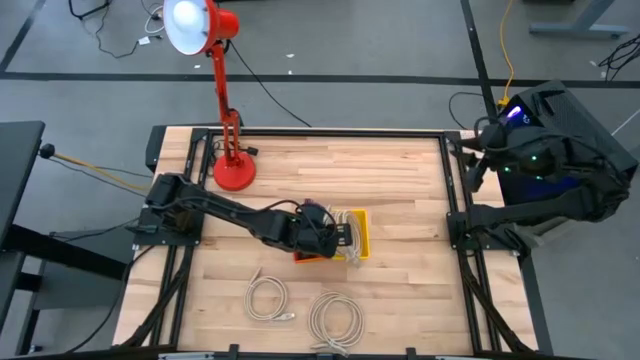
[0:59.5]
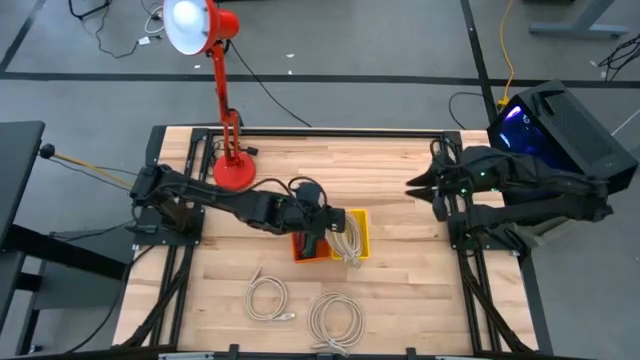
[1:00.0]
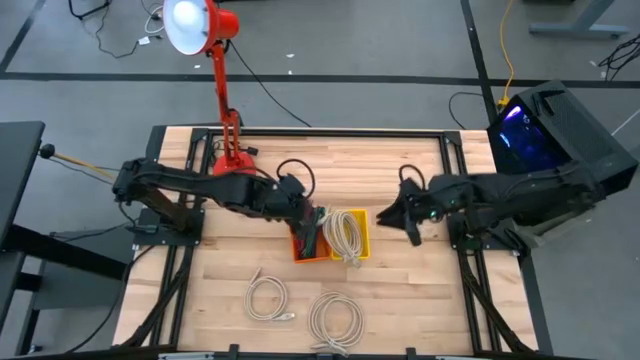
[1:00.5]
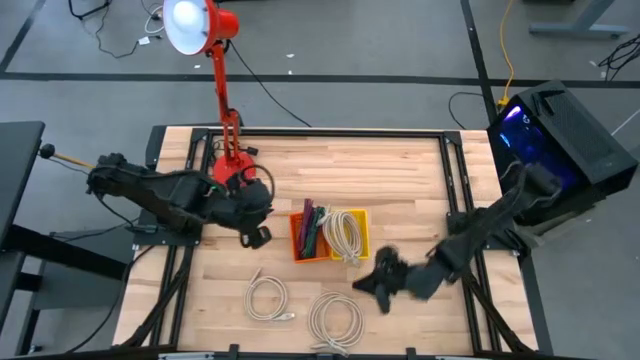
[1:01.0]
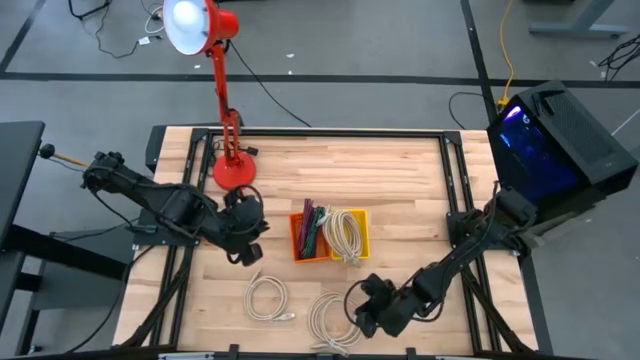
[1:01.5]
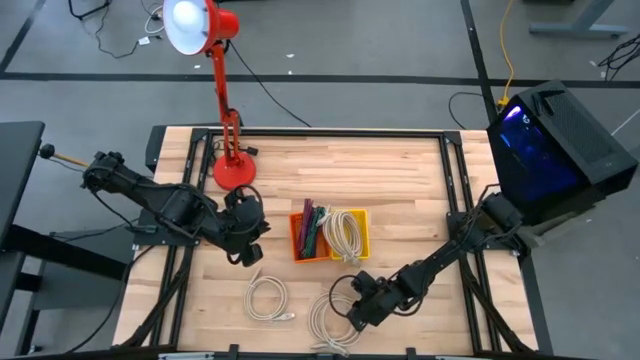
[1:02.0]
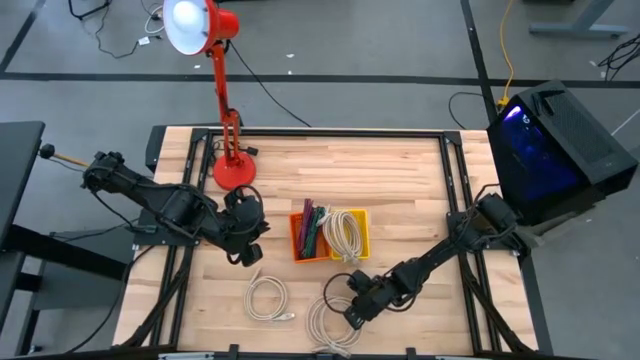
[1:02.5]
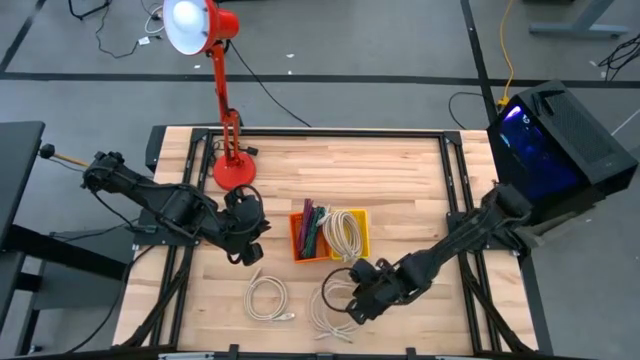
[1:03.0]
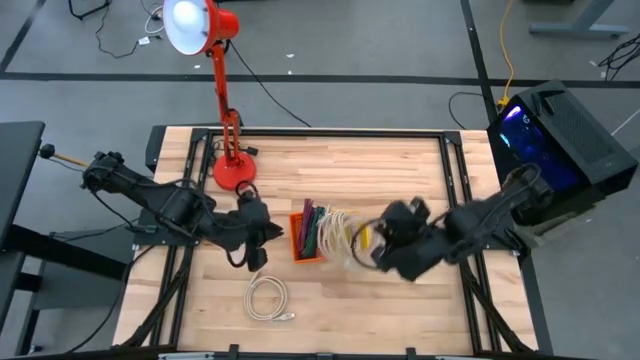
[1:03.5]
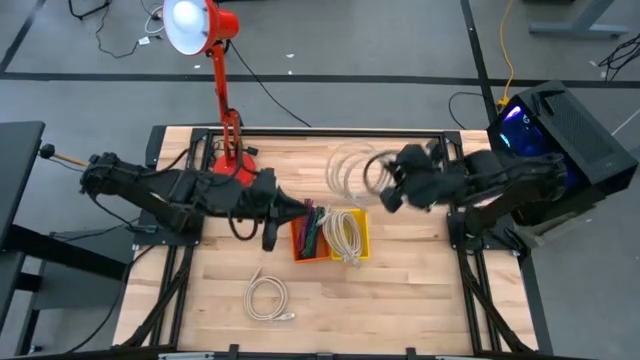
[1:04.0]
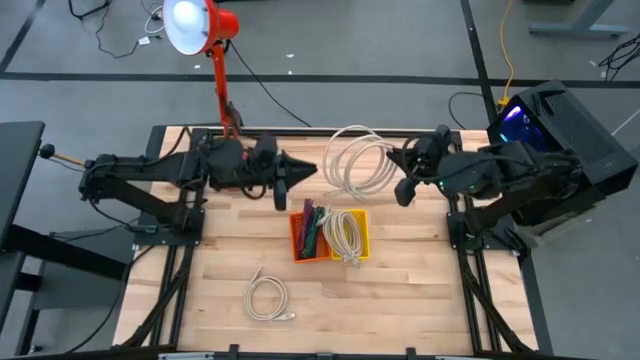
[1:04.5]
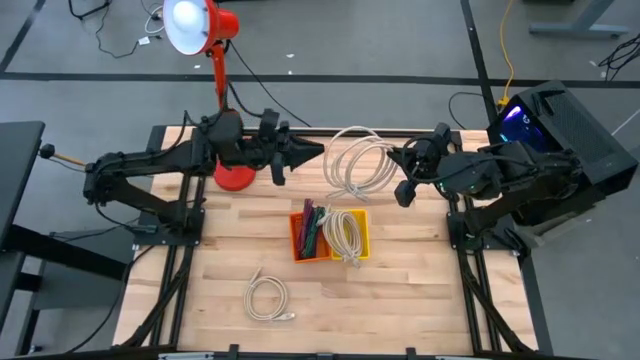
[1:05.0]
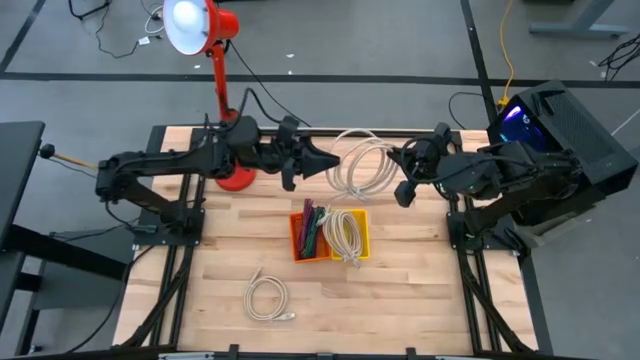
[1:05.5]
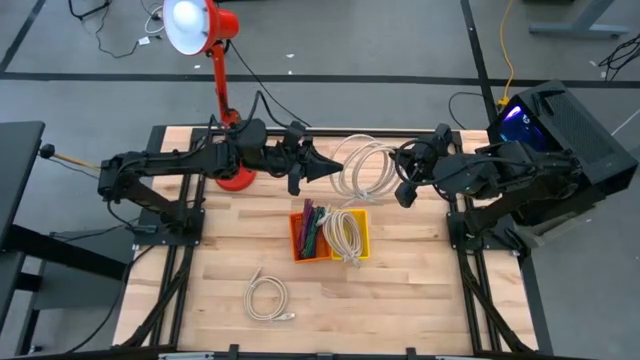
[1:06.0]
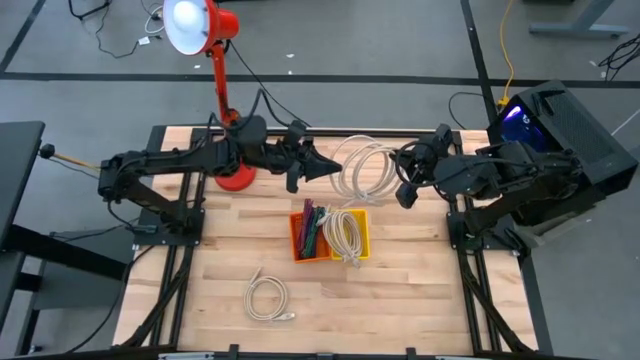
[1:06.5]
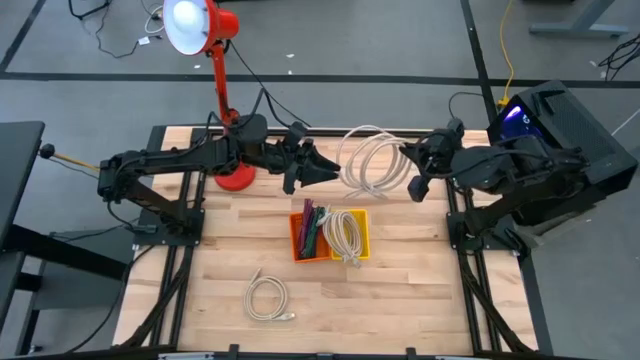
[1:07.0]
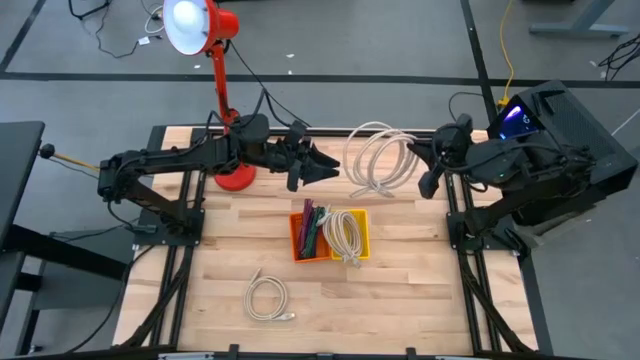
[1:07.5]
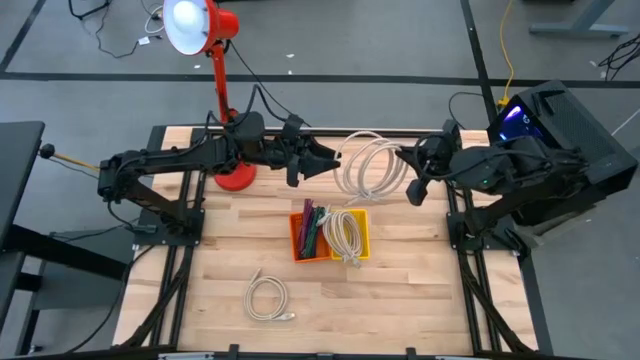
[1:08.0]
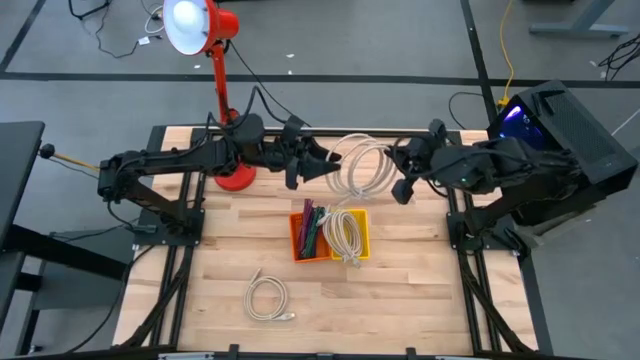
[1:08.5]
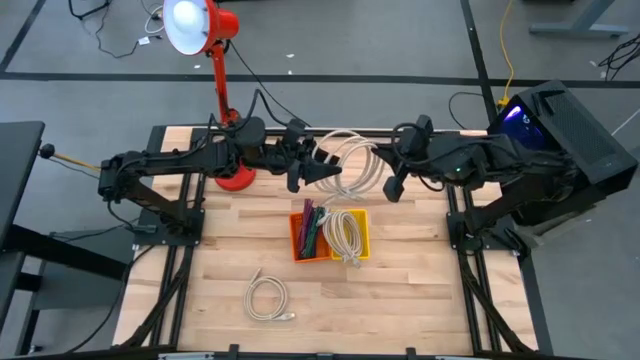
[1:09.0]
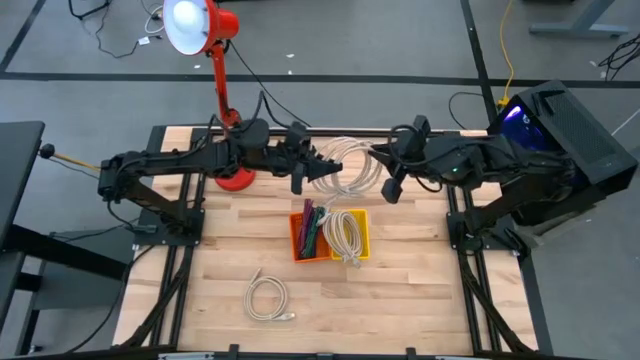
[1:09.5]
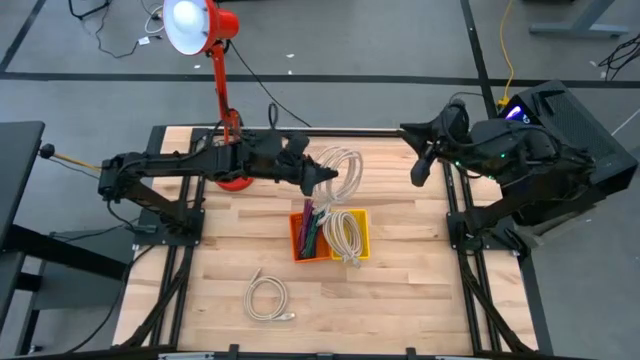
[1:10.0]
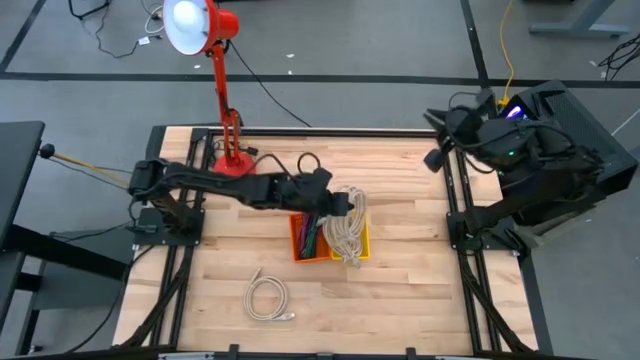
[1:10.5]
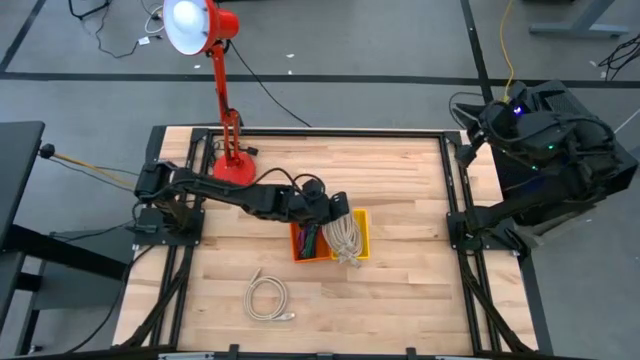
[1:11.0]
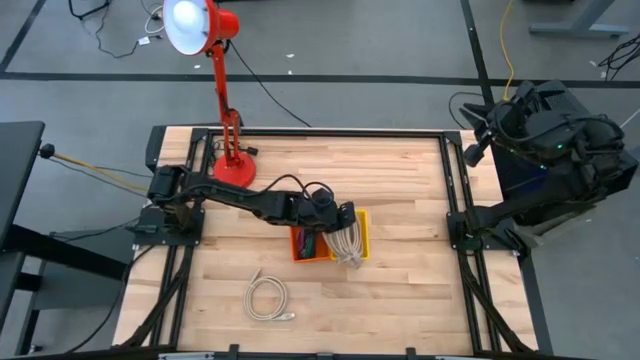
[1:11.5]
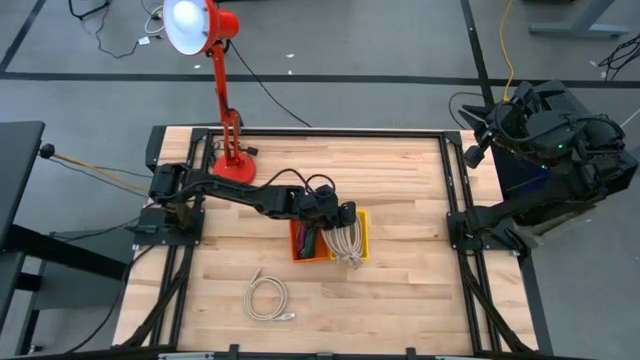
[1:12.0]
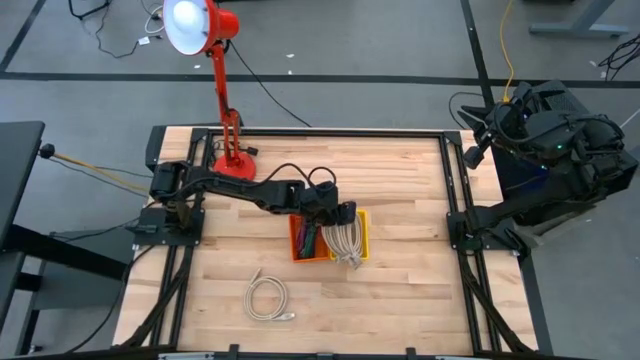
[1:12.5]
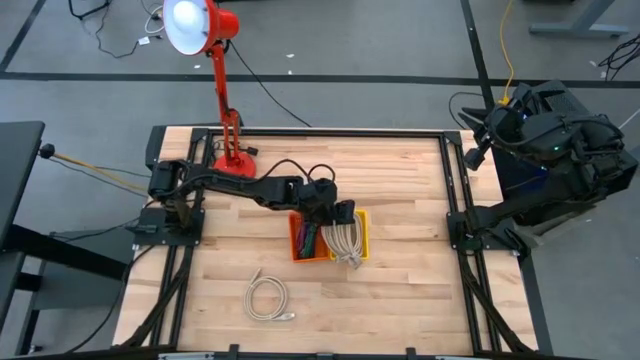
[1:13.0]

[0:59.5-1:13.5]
Task: Pick & Place USB Port
Put the light brown HDMI cable into the yellow bin

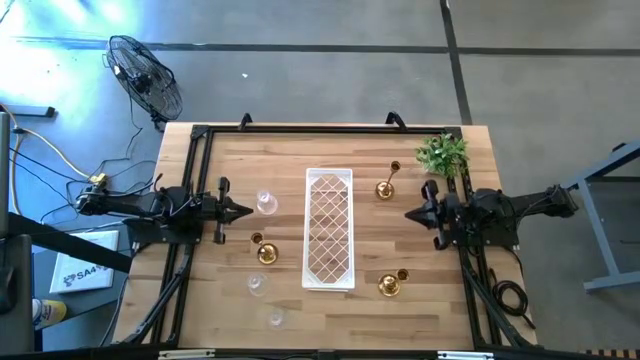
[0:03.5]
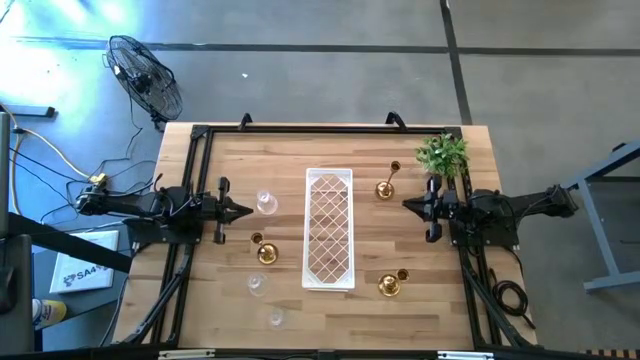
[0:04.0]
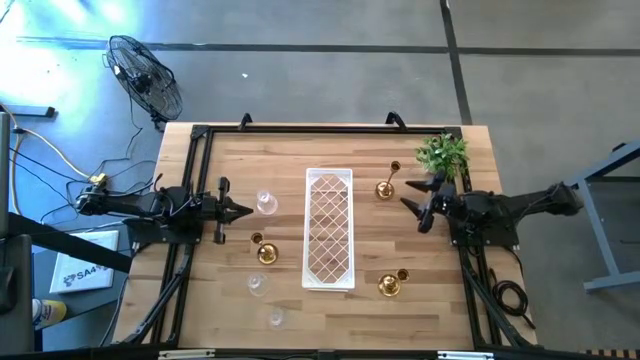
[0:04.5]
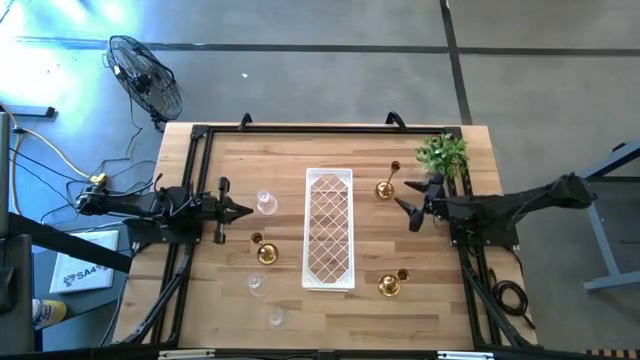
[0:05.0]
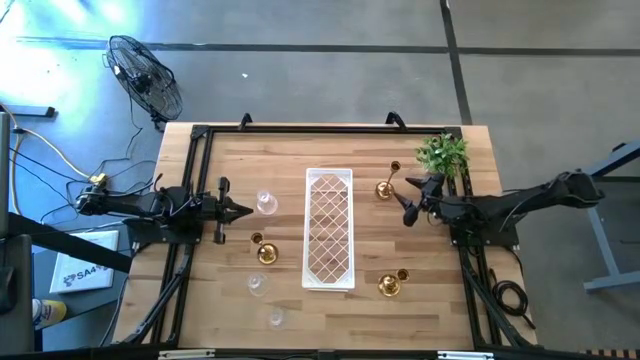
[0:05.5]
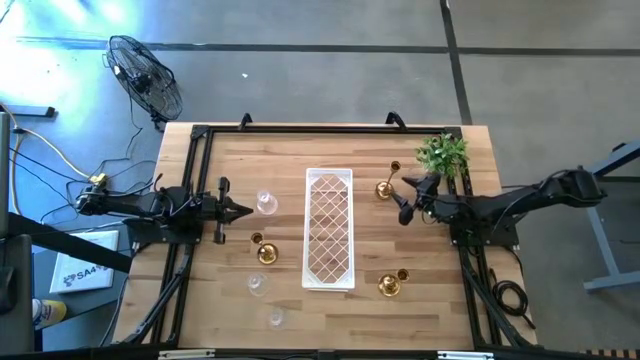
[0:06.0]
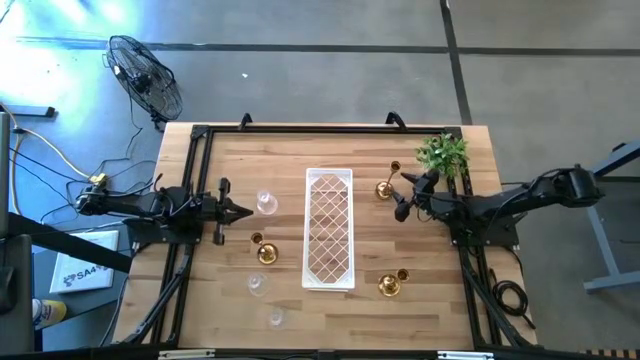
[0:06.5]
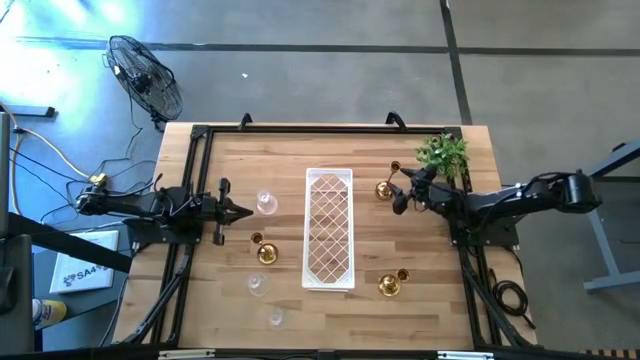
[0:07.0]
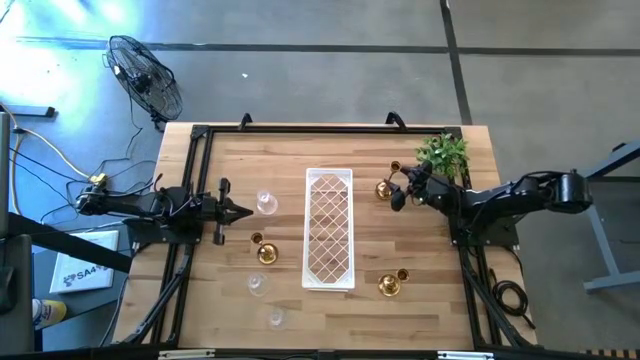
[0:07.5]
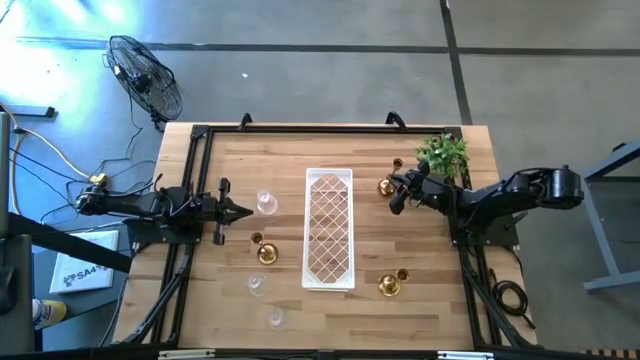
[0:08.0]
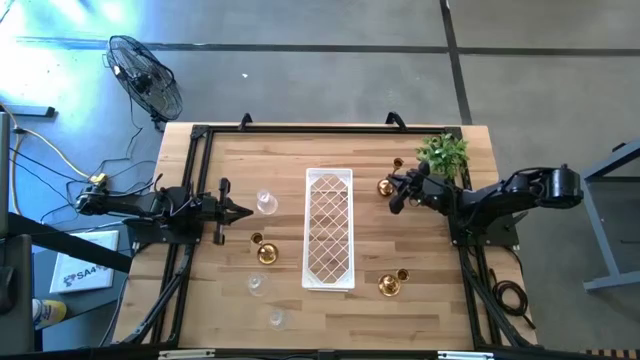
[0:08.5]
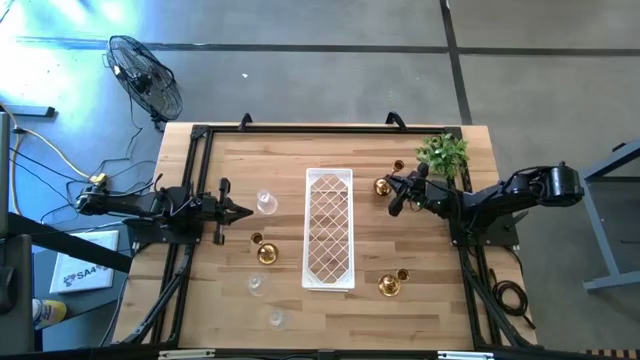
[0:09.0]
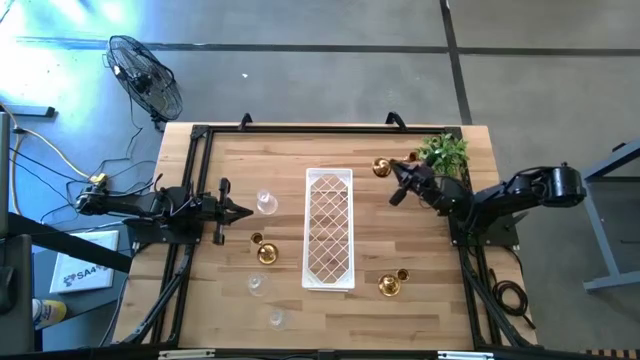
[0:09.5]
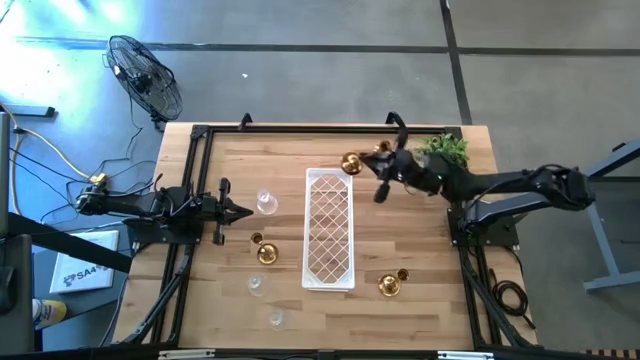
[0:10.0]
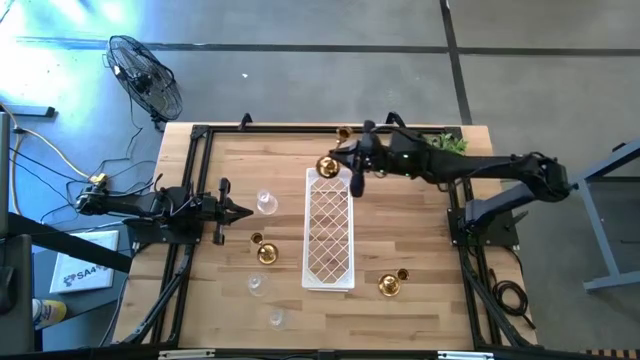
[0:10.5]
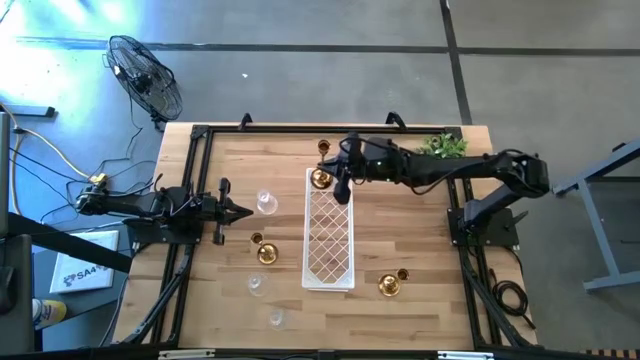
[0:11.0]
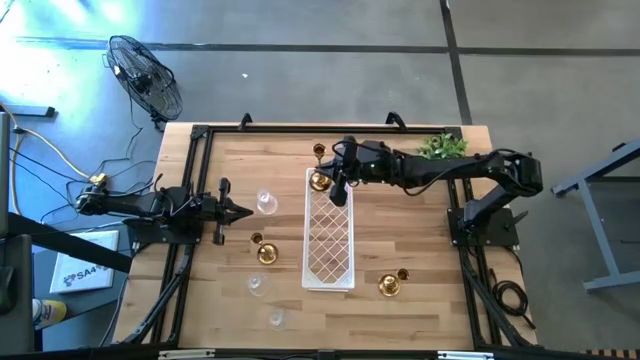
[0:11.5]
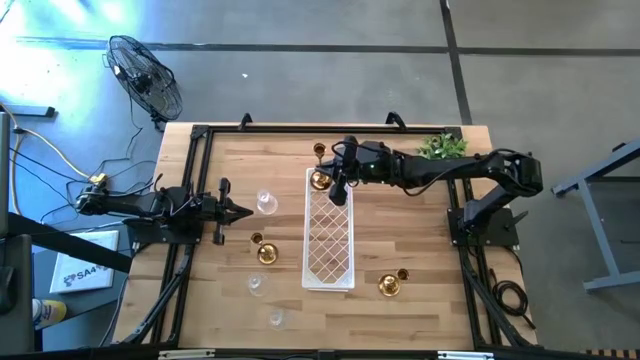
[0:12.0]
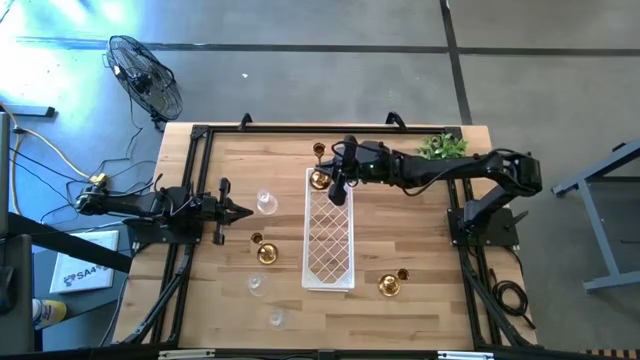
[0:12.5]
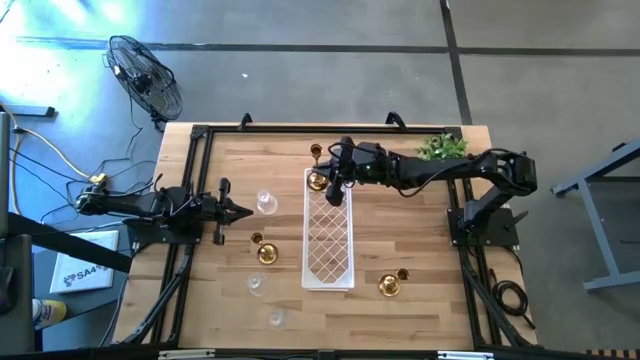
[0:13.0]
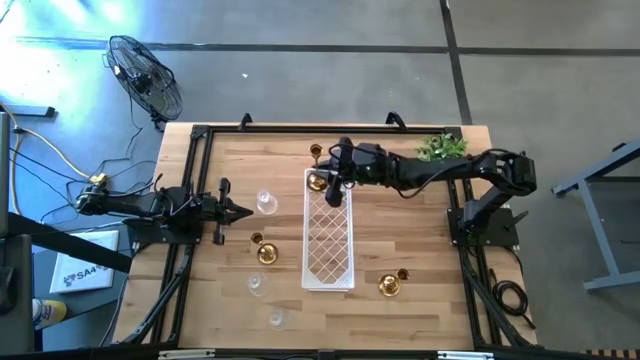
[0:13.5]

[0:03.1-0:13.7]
Task: Pick & Place candle stick holders
Put the top gold candle holder on the shelf
